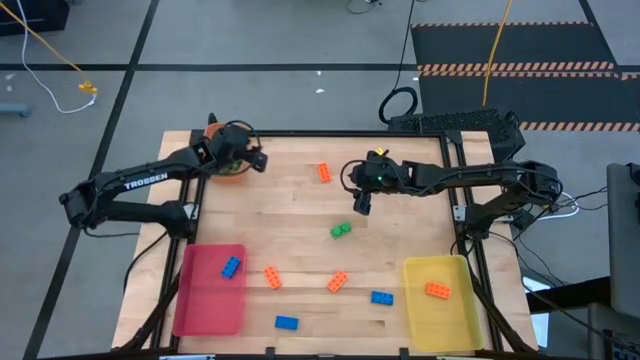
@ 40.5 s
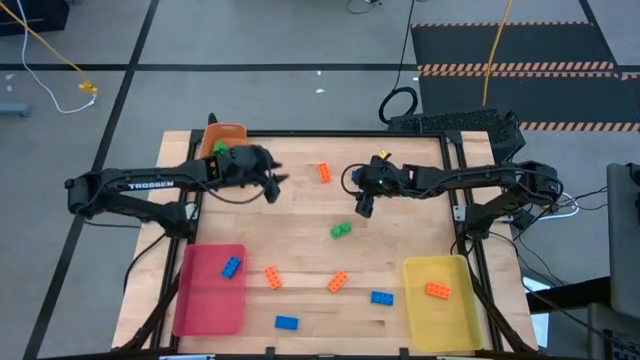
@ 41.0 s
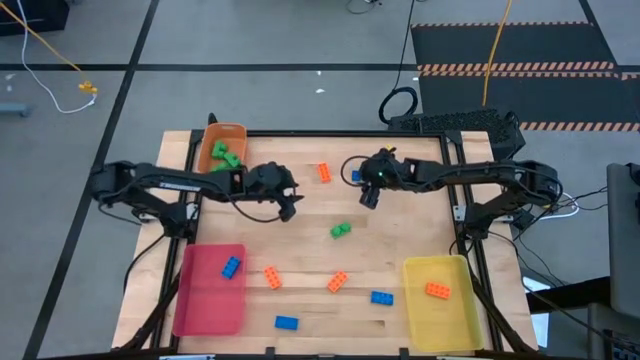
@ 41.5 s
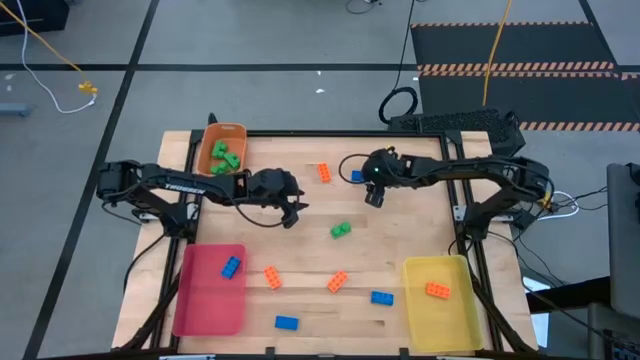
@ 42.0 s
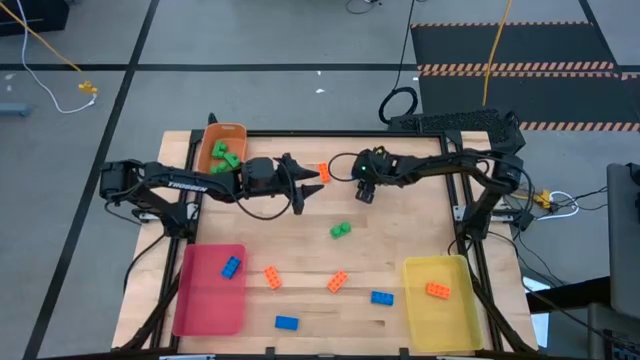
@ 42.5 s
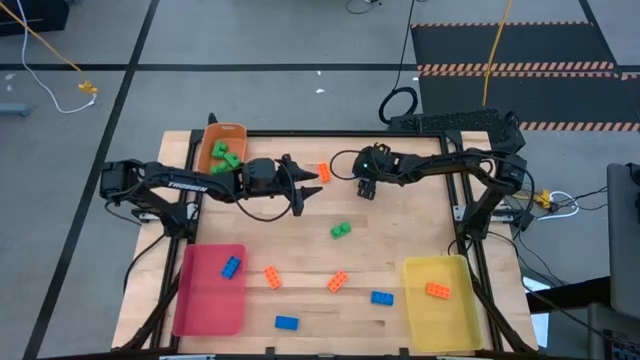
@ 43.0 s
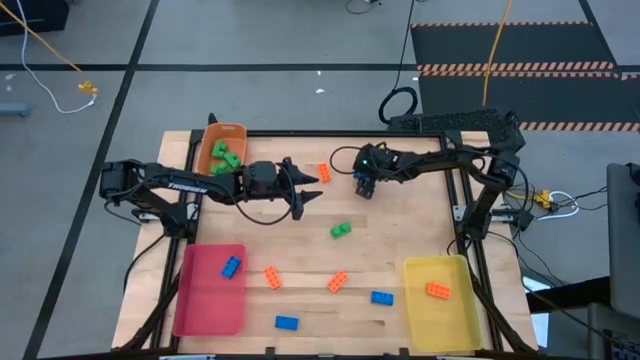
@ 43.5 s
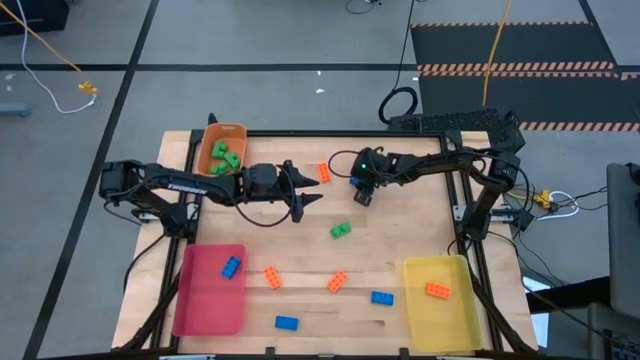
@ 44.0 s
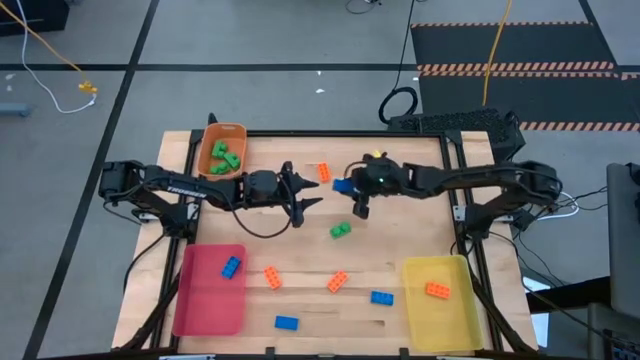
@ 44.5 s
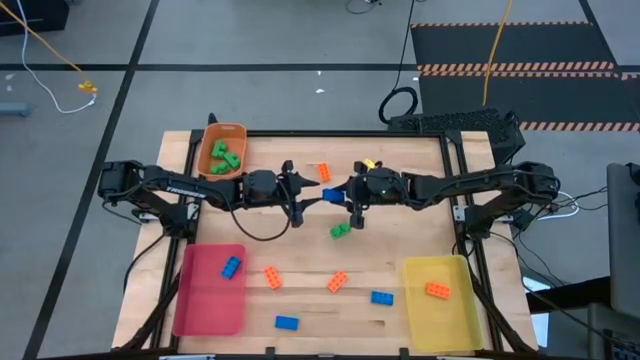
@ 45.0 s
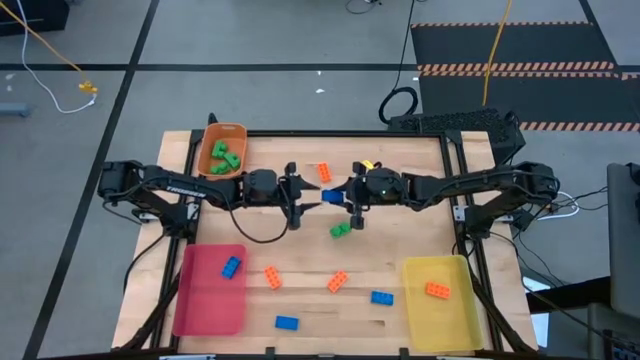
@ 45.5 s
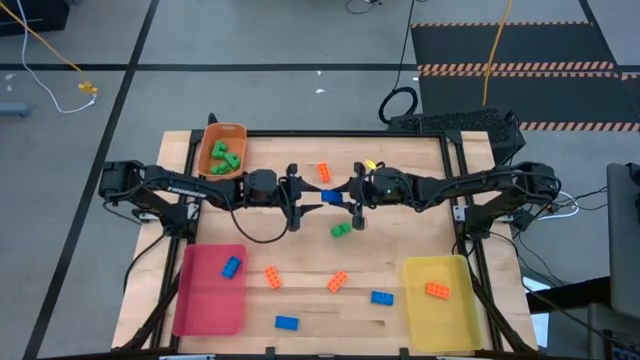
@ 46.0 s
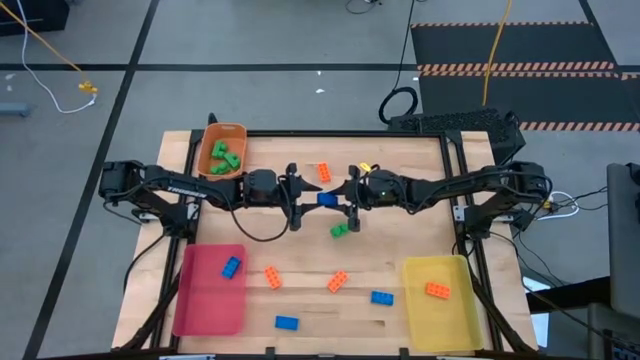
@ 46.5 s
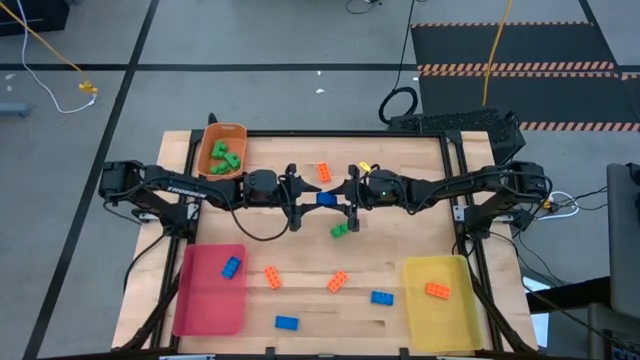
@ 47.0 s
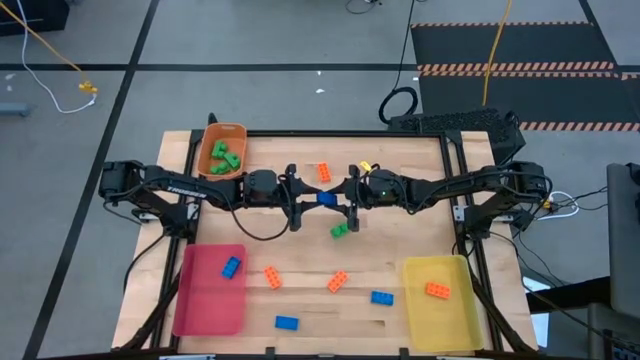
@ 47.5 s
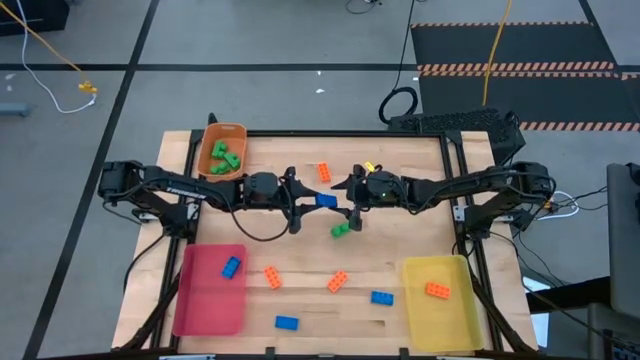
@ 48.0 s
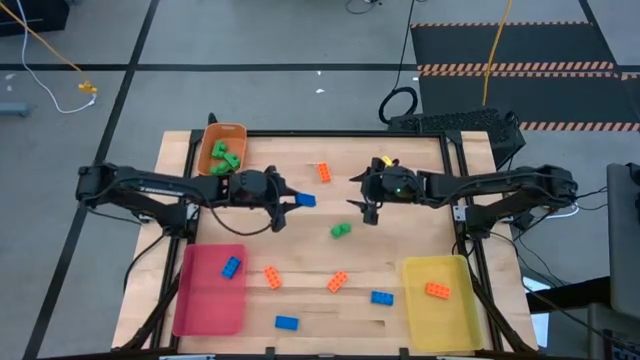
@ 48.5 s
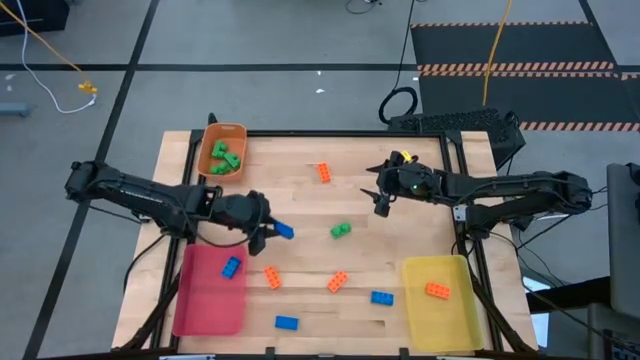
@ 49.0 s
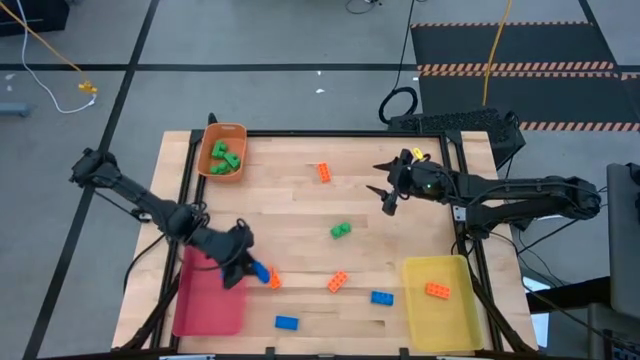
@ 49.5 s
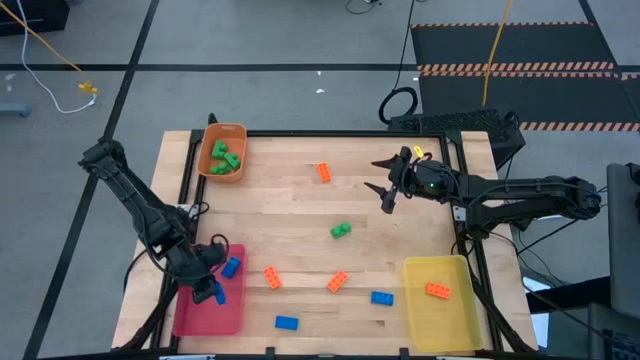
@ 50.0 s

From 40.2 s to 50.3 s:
Task: Sort & place blocks by color
Put the blue game piece into the red bin

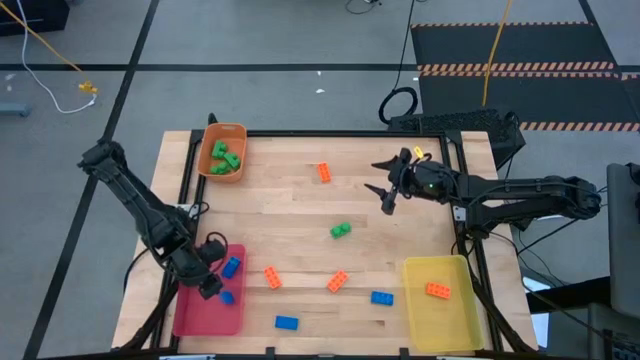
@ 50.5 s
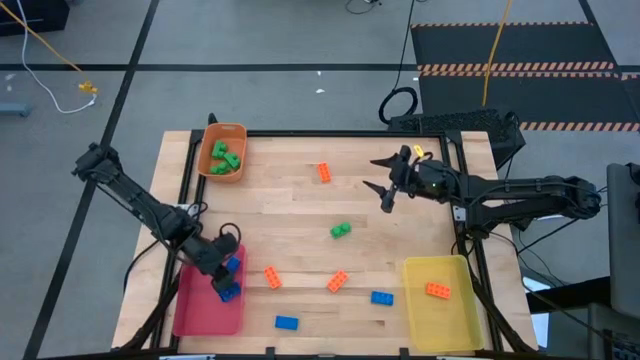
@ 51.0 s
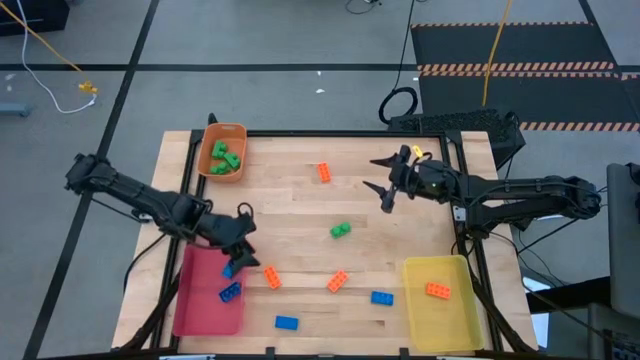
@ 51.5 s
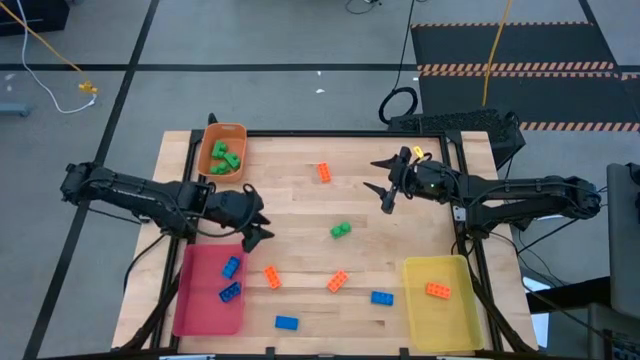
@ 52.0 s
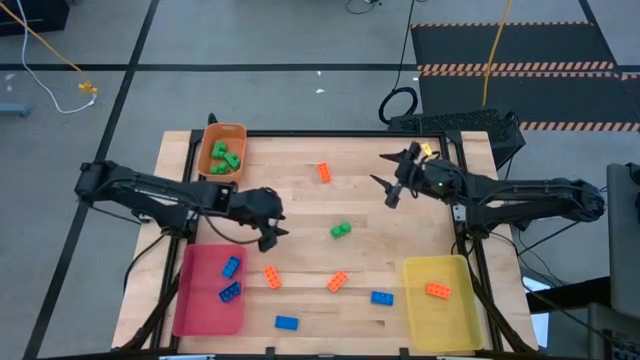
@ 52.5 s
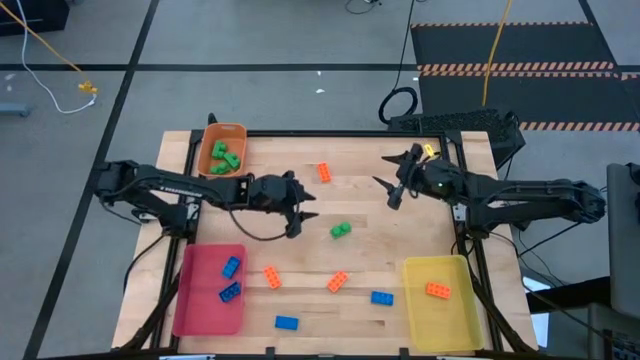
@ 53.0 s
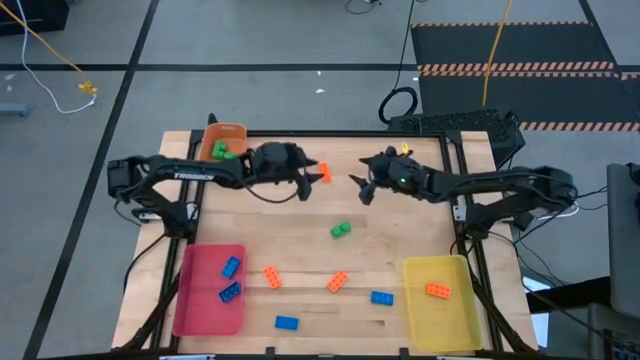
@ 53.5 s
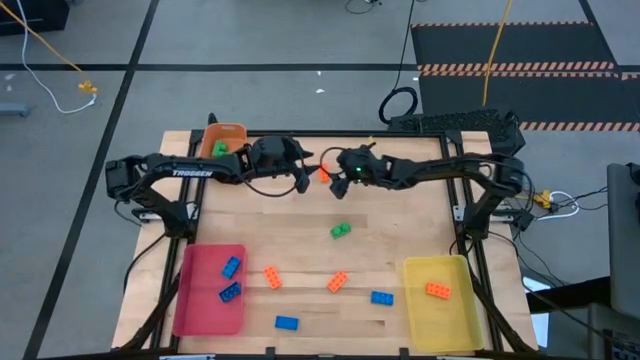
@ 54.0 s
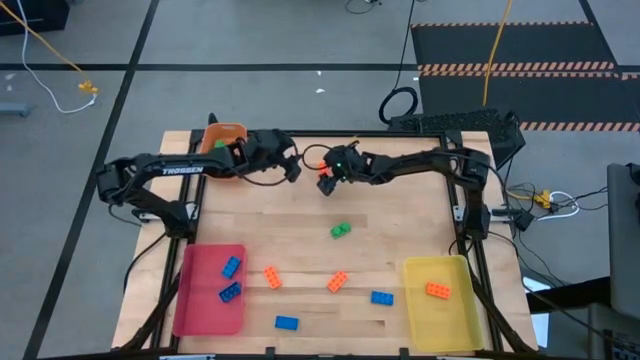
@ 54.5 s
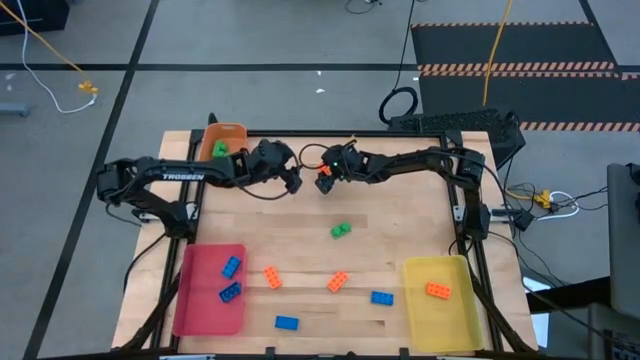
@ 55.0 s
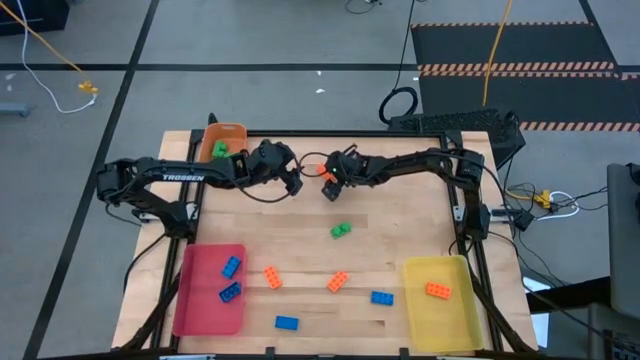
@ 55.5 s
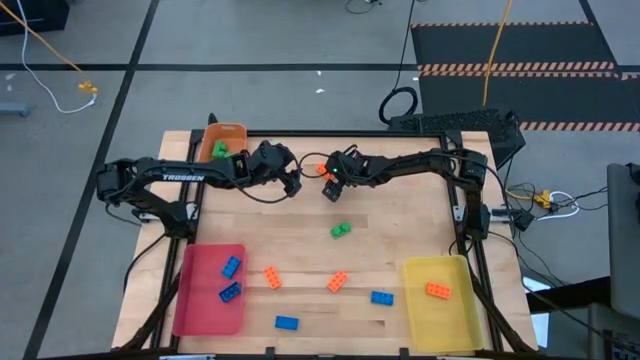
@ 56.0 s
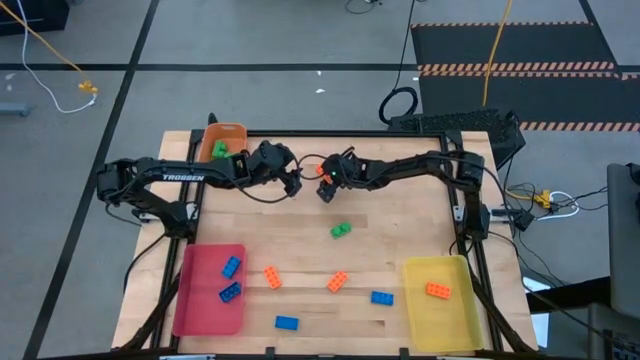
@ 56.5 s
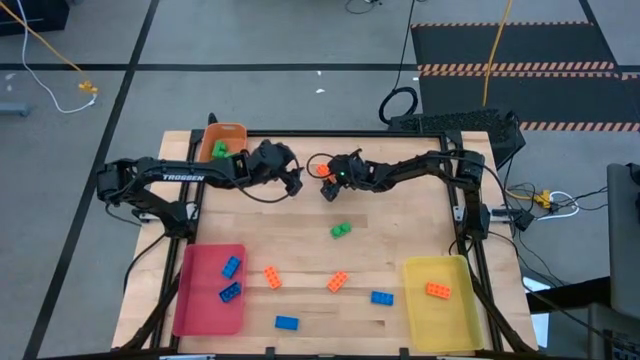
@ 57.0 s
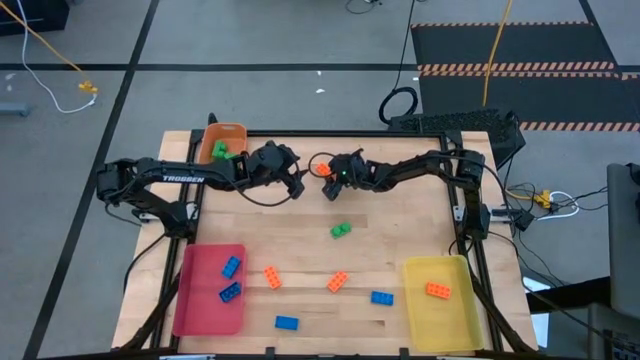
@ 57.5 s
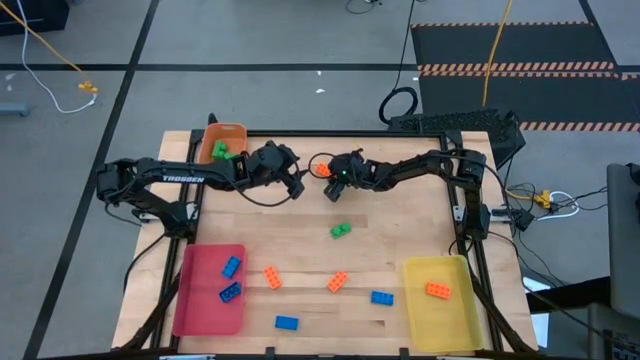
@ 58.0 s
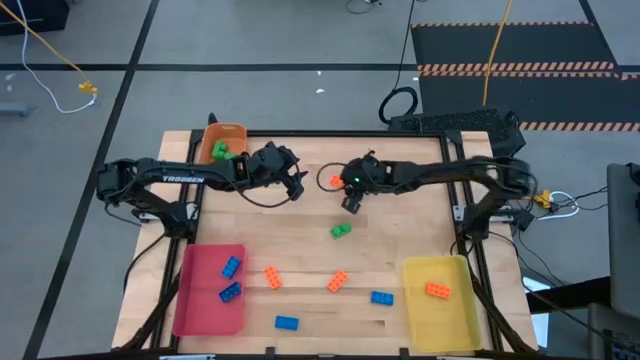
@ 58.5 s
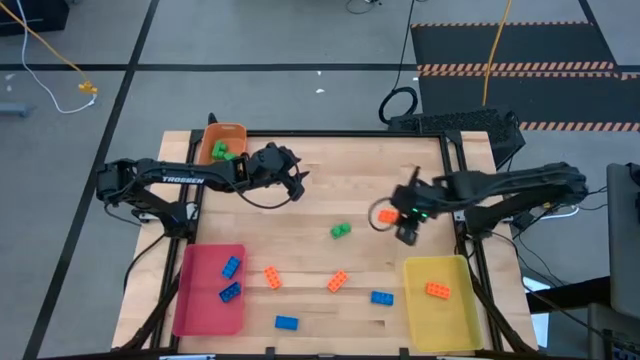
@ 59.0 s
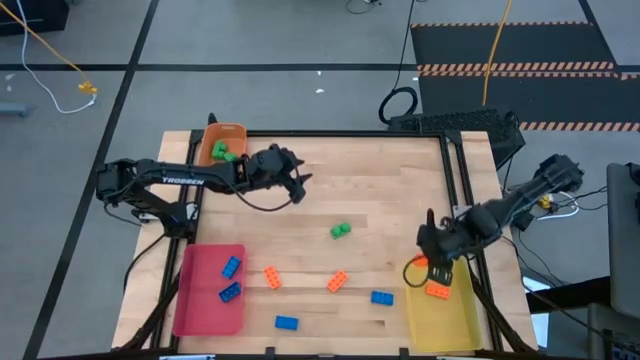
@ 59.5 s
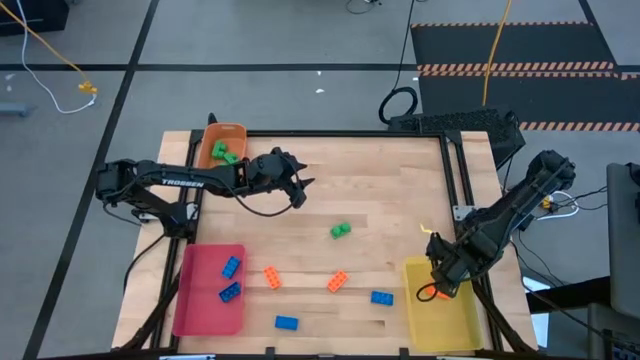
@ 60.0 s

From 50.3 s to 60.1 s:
Put the orange game piece into the yellow bin

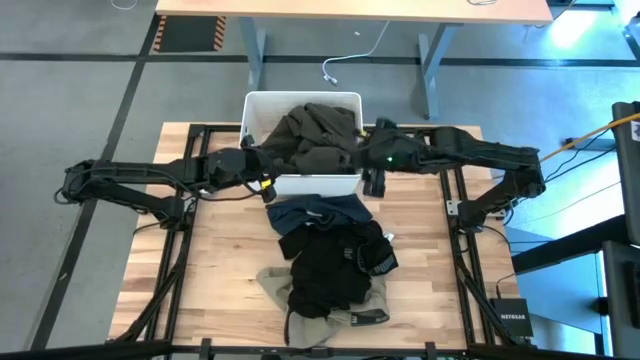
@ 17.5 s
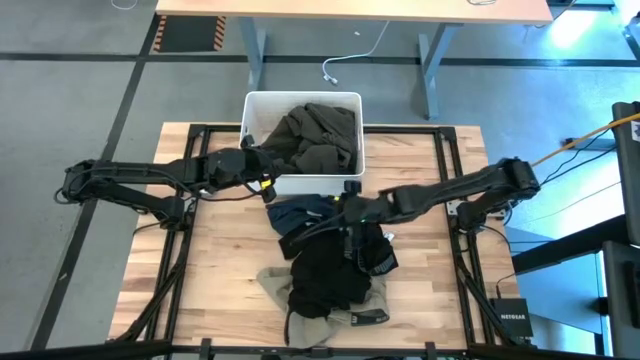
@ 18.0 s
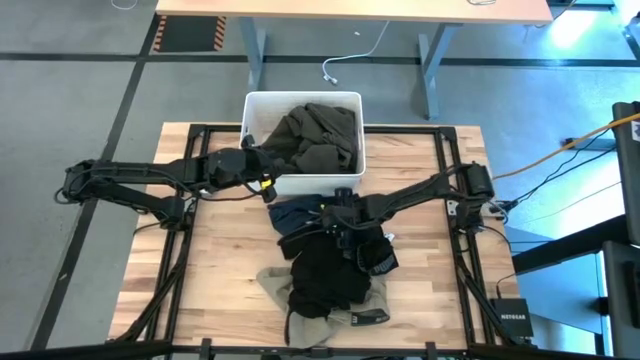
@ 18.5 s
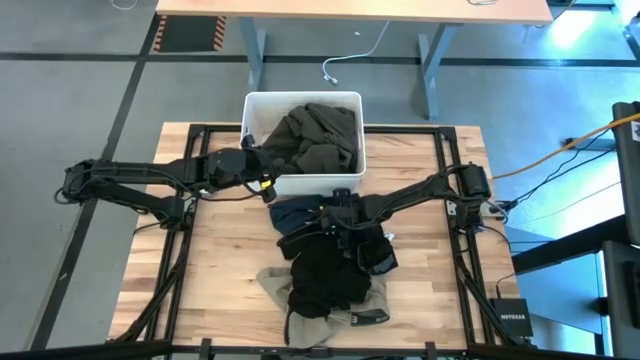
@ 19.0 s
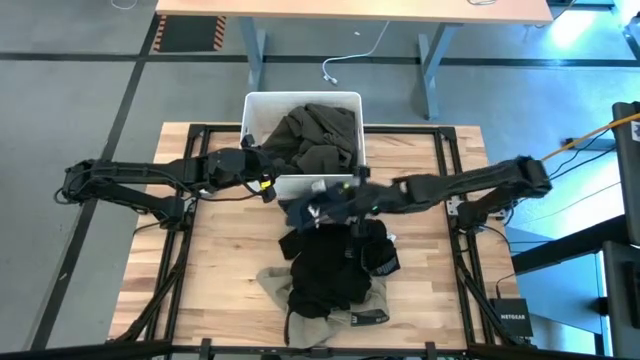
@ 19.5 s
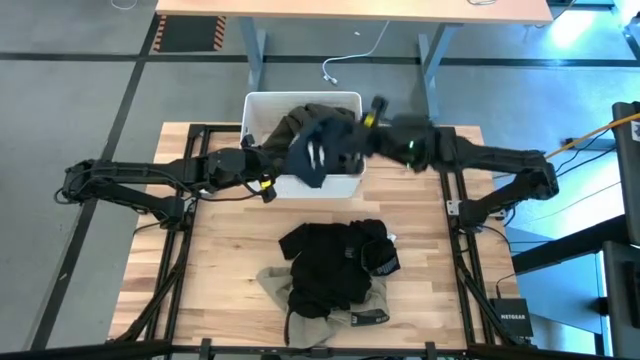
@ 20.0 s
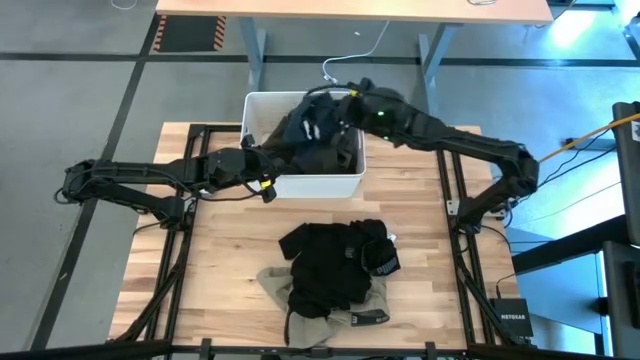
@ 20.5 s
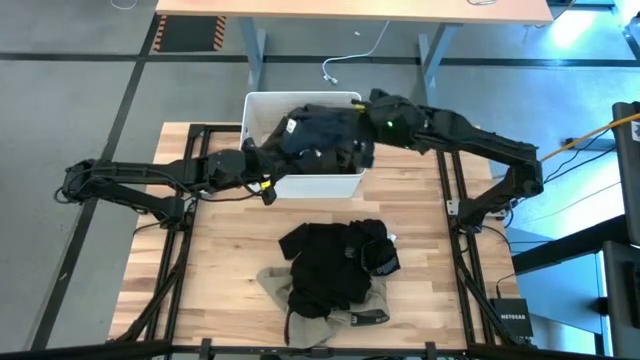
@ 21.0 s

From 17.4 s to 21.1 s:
Task: Sort clothes
Put the black shorts into the white bin
